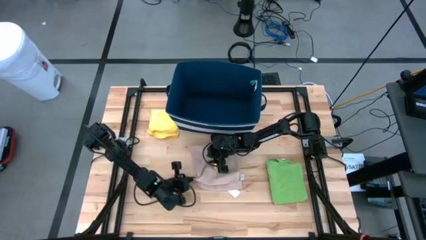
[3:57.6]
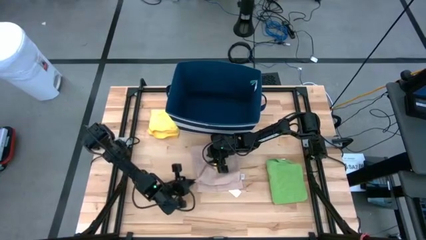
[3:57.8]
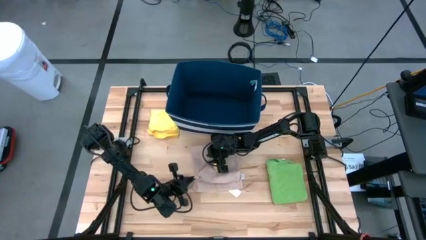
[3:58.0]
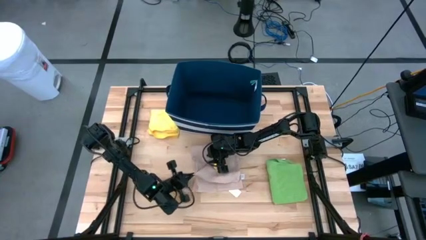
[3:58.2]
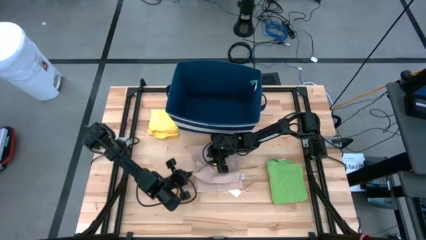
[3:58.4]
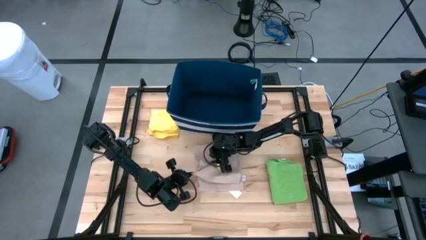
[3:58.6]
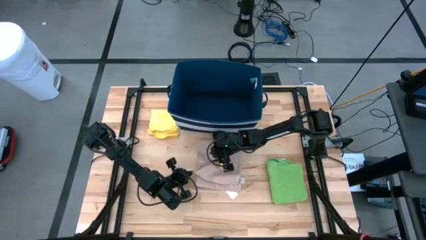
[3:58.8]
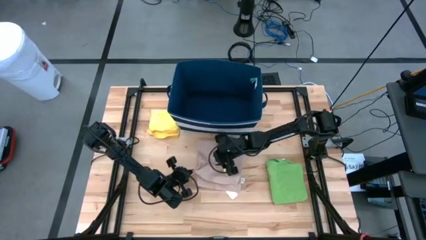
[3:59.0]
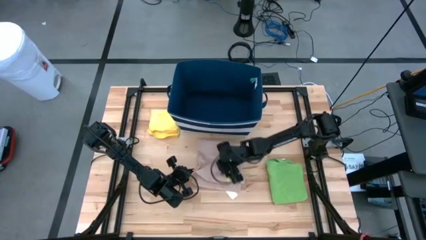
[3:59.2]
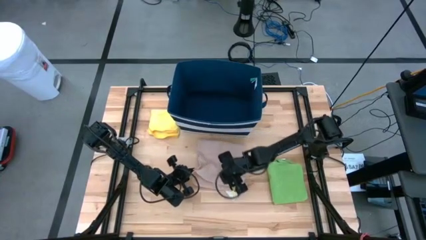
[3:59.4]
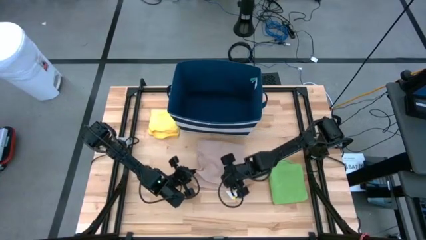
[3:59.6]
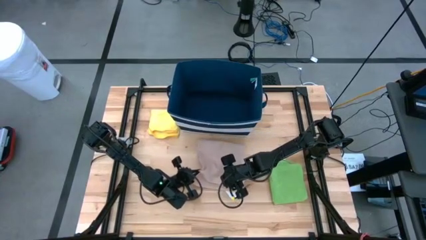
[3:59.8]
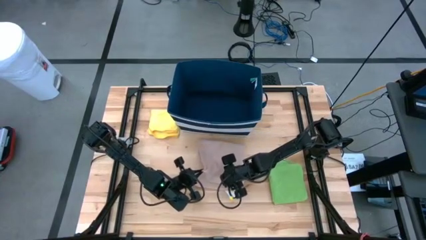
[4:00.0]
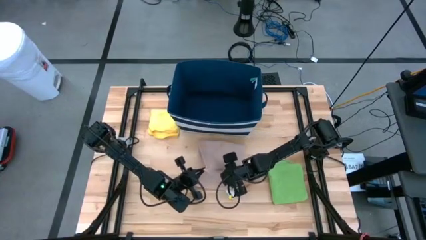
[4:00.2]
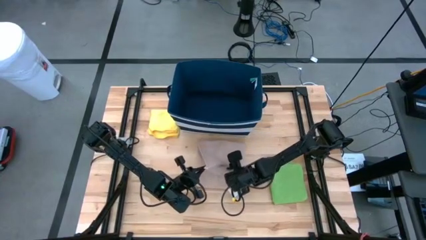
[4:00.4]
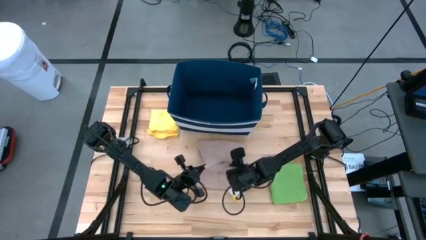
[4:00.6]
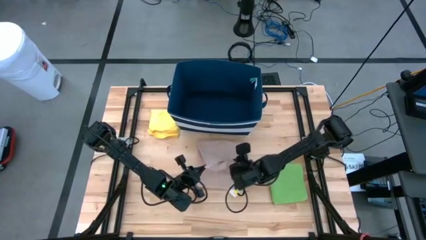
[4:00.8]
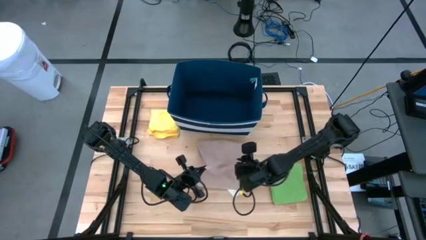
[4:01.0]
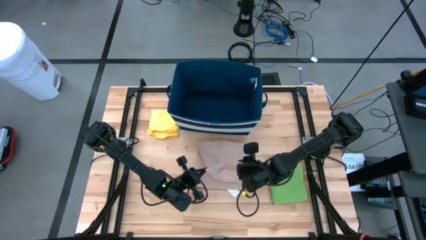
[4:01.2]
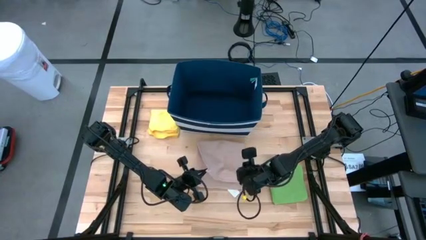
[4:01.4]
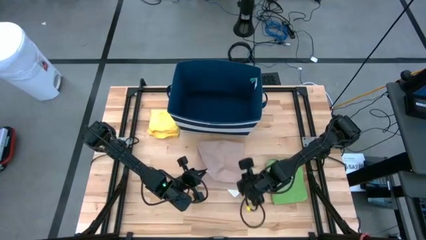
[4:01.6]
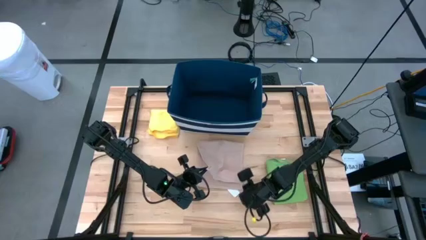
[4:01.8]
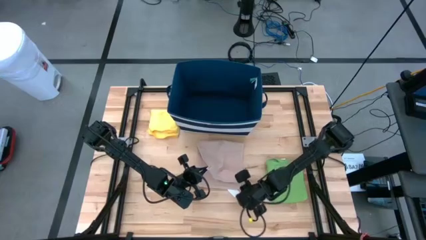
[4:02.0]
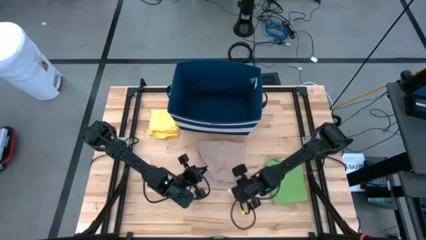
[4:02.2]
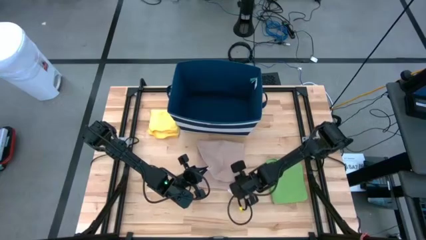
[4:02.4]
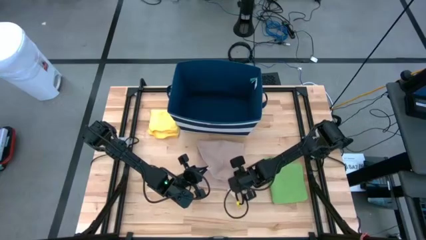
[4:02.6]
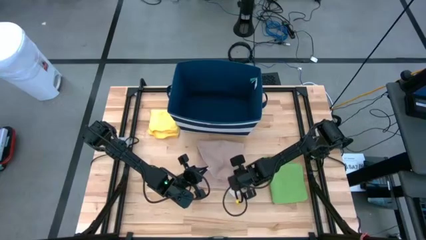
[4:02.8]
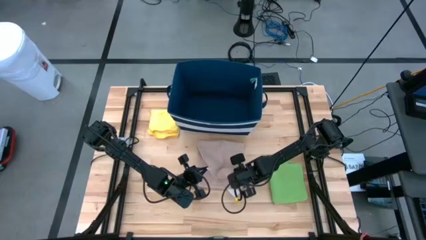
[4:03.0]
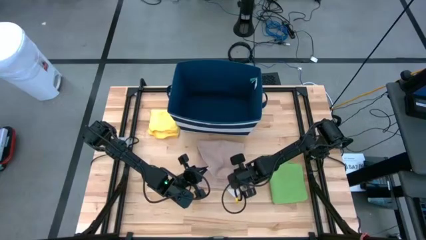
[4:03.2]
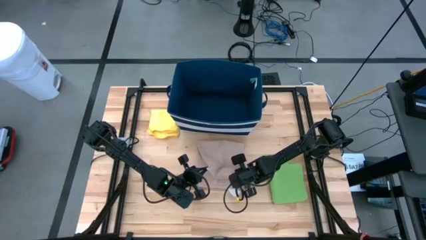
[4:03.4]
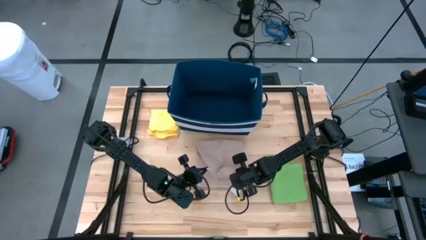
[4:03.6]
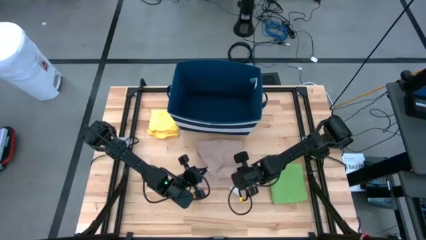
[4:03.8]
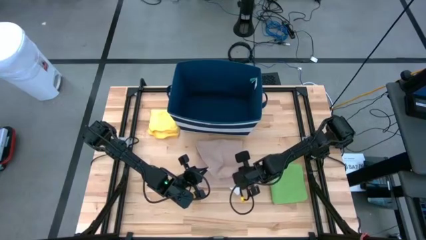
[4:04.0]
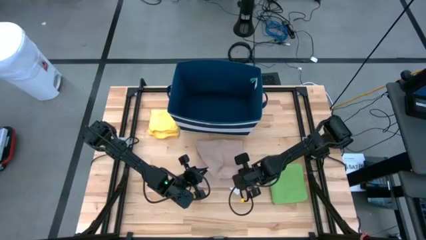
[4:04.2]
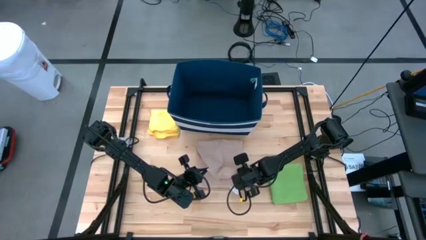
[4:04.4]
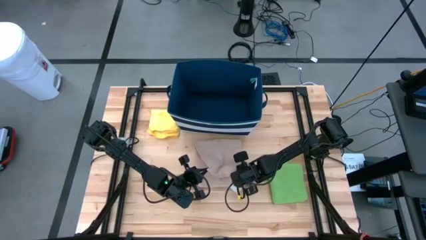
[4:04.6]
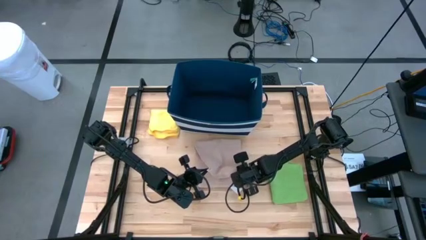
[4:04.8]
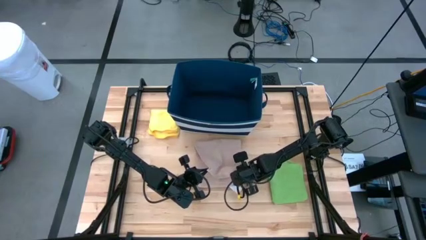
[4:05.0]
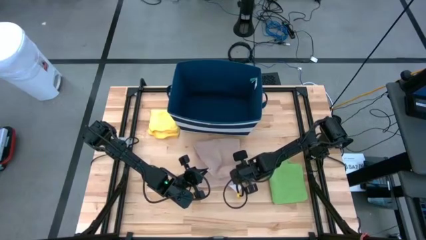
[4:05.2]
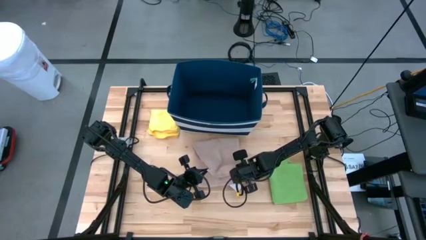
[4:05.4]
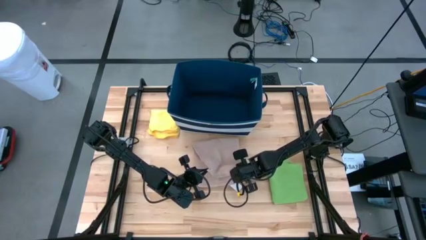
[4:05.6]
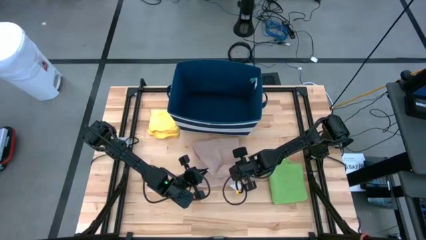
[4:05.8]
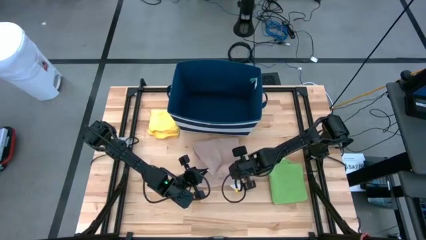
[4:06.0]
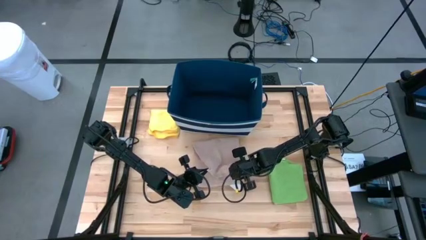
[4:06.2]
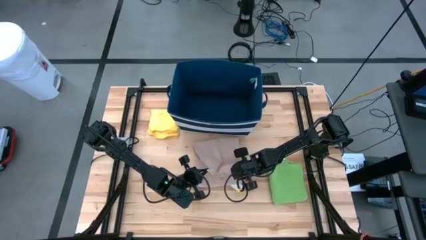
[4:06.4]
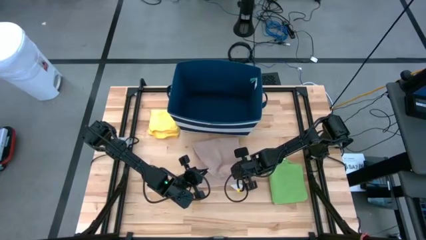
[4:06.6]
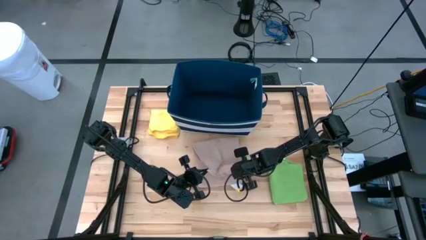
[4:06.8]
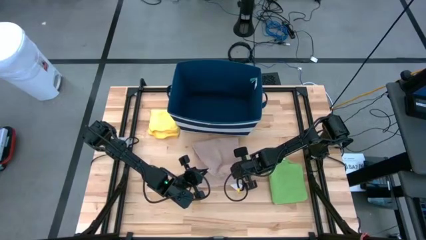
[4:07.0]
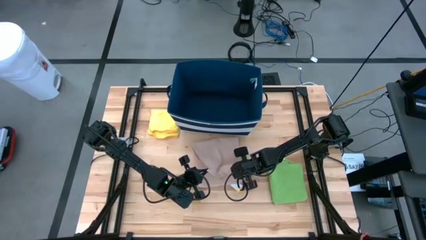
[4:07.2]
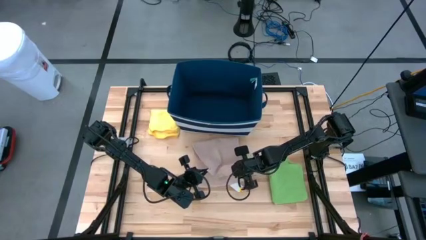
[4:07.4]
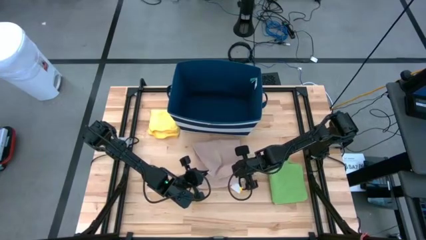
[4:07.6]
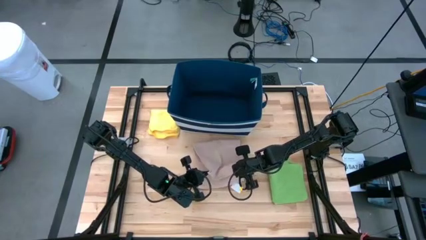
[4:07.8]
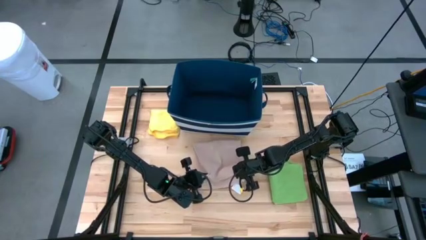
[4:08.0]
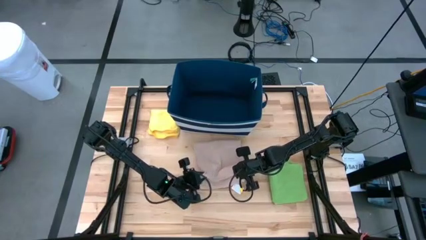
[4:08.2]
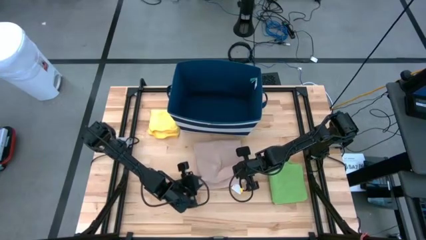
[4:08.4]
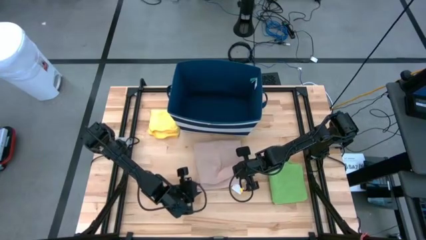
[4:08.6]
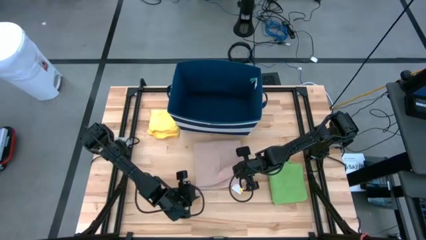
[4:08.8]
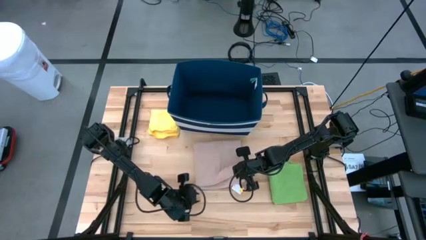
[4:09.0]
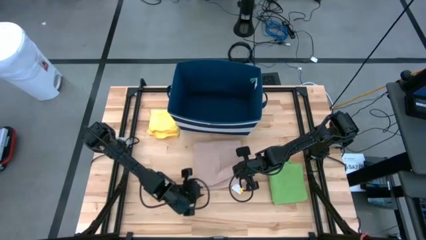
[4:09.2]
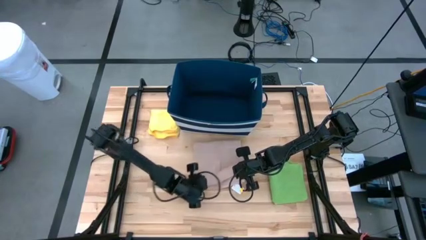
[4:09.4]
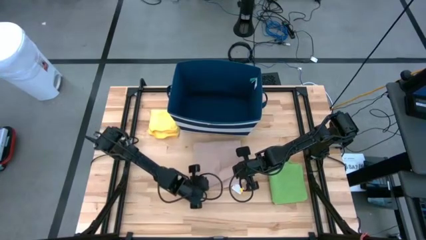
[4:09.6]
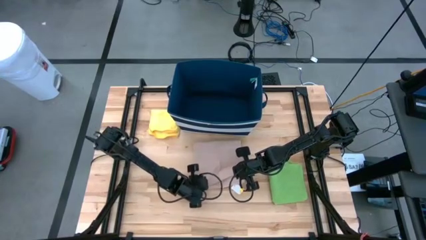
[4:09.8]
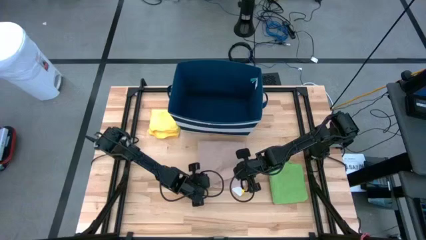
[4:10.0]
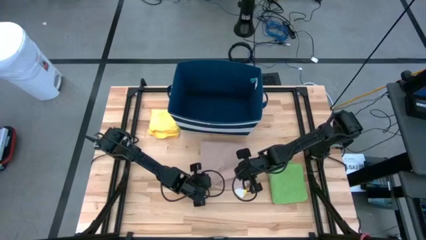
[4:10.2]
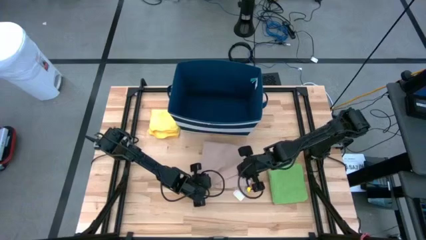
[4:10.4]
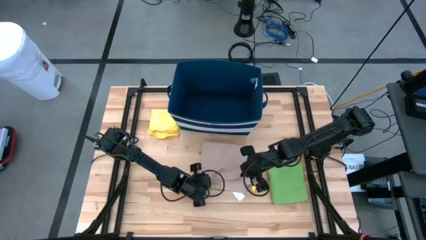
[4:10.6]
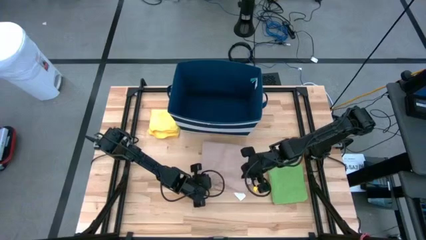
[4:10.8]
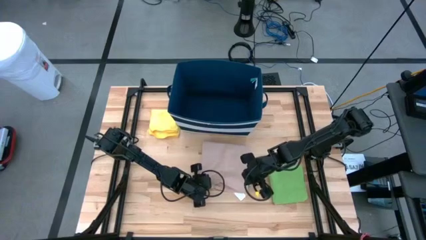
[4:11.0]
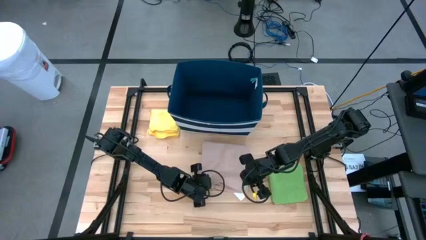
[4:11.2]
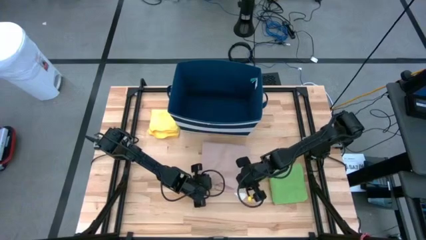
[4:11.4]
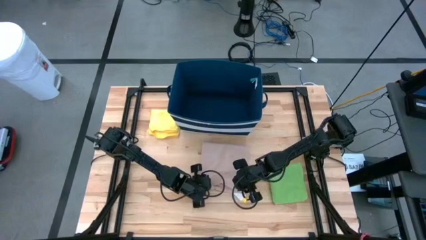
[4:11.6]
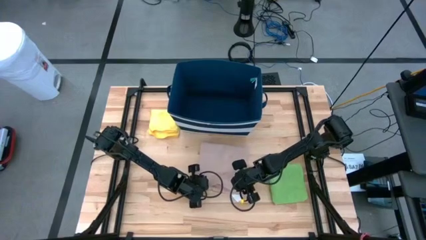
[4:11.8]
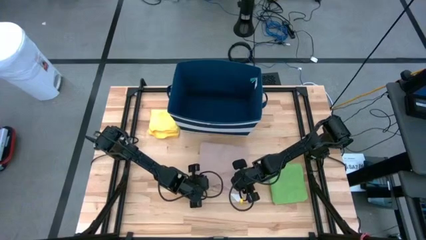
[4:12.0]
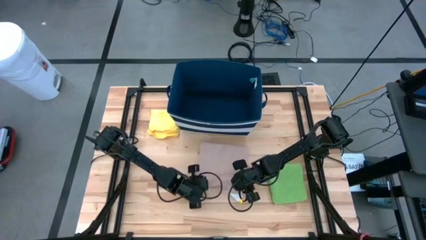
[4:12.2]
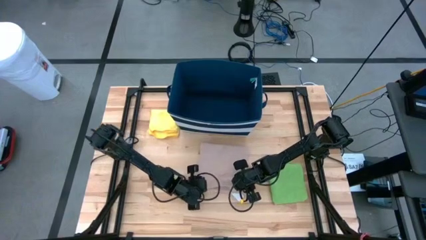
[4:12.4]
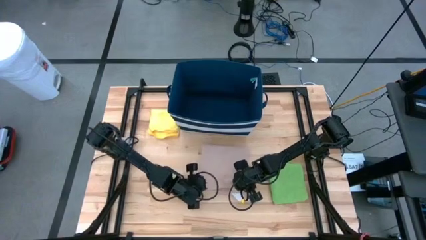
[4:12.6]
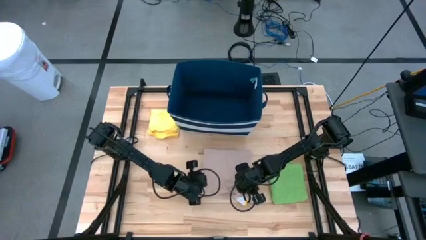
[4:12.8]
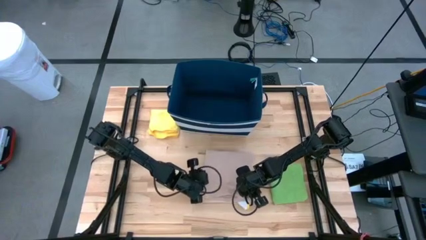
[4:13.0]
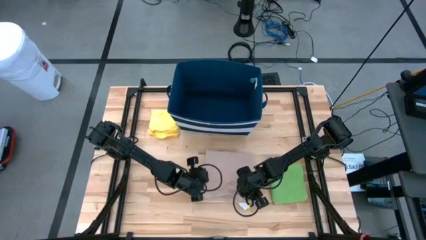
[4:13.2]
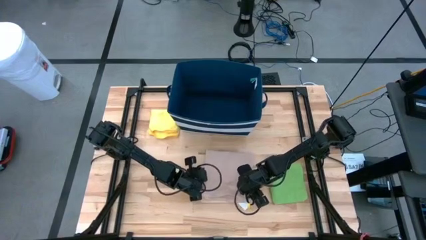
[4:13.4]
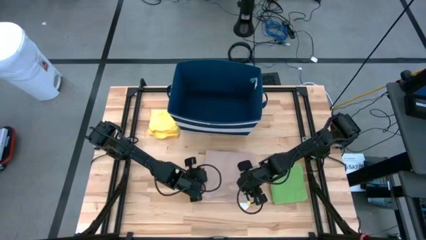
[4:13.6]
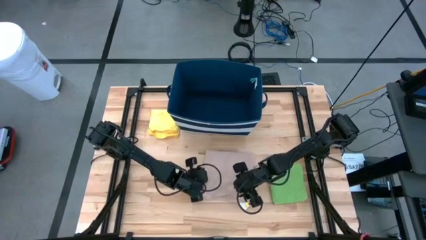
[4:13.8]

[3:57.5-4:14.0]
Task: Fold towel
Fold the light pink towel
